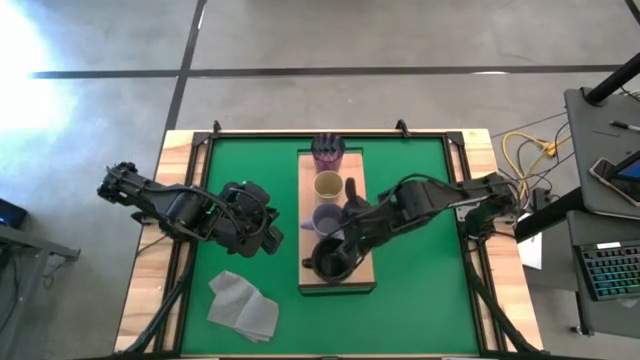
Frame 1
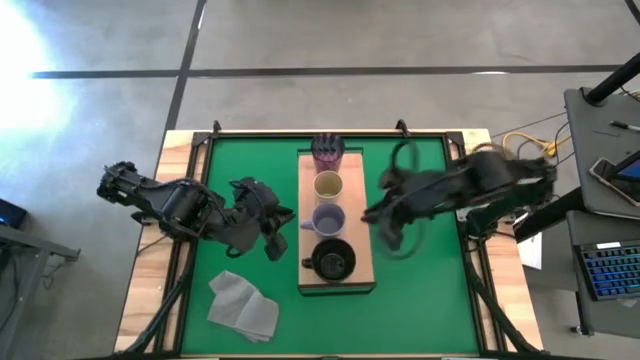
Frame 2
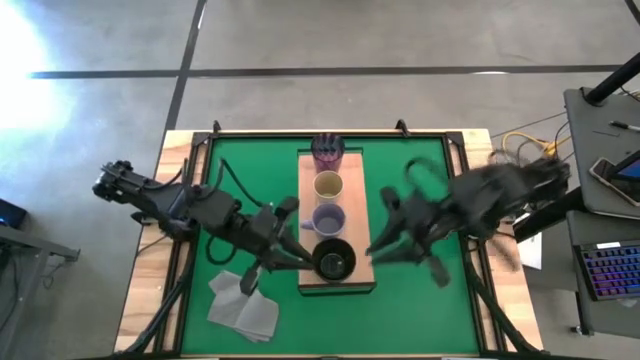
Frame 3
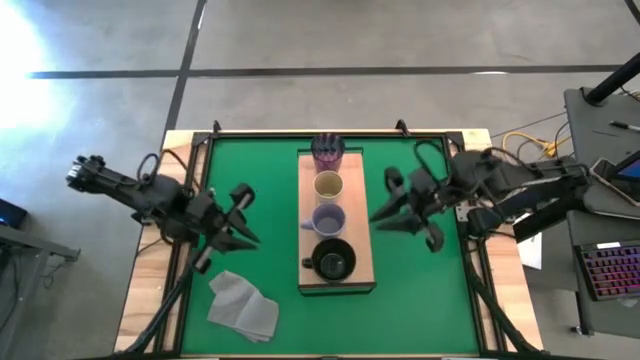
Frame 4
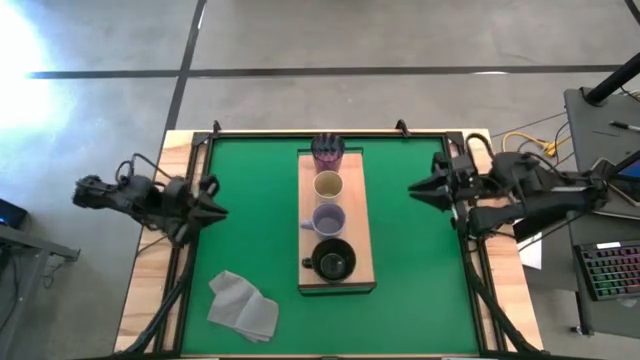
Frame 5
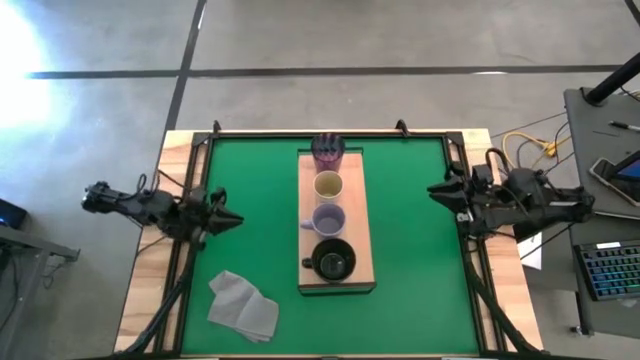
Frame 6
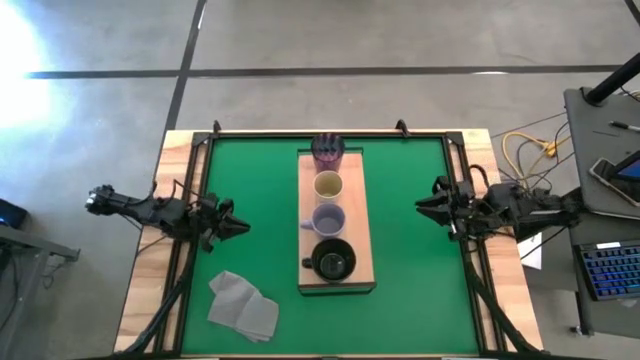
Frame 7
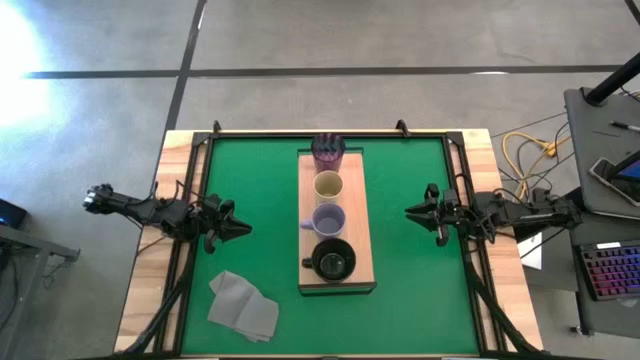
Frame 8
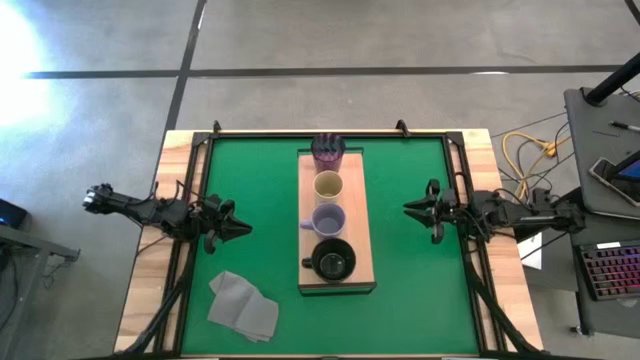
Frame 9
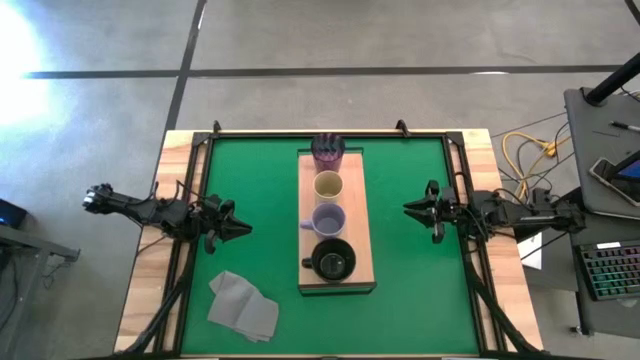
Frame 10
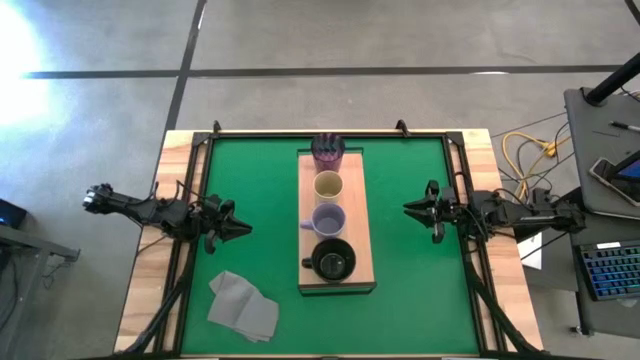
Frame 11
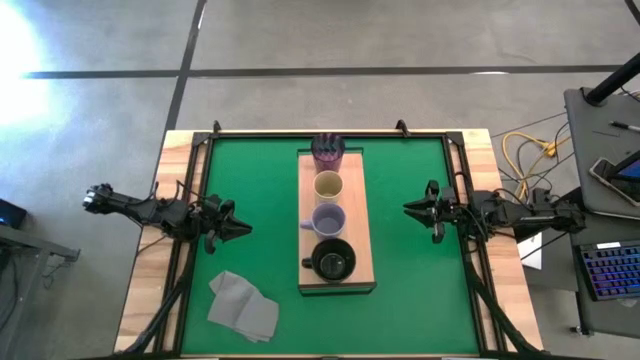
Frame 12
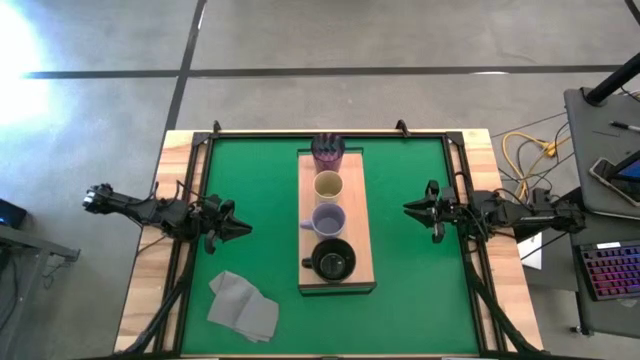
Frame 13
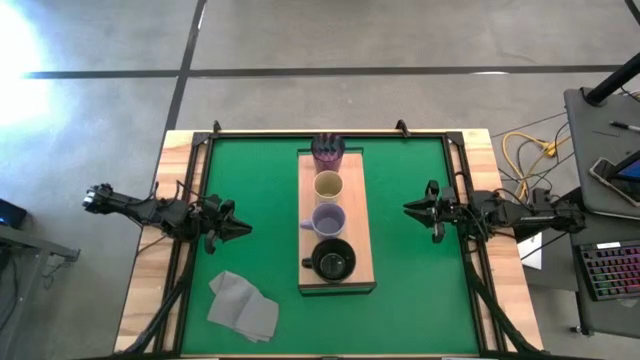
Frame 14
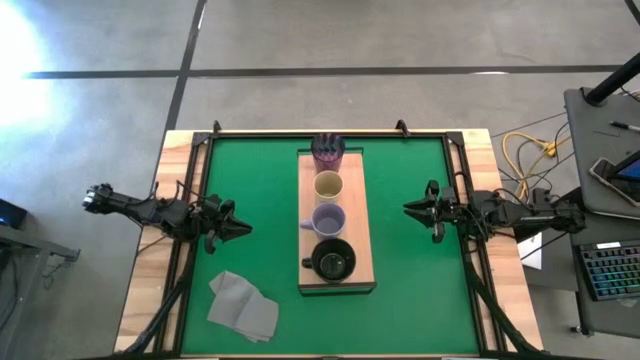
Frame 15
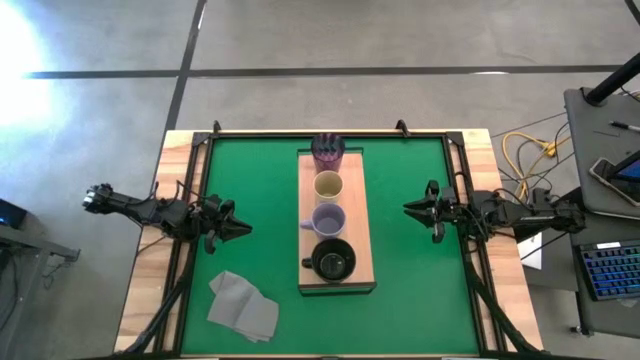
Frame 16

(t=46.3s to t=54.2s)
Task: Stack small to large cups/mugs on shelf
Return to Home Position

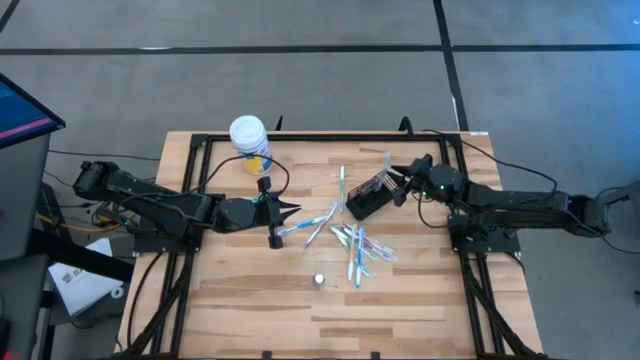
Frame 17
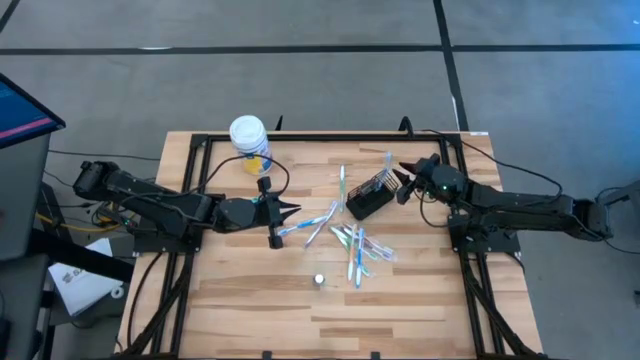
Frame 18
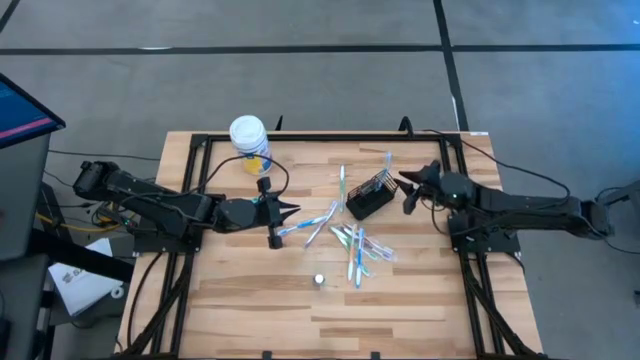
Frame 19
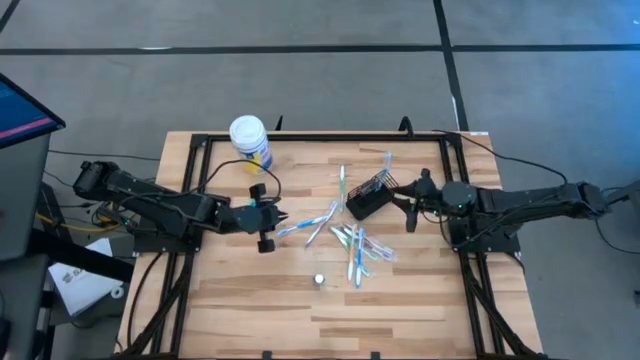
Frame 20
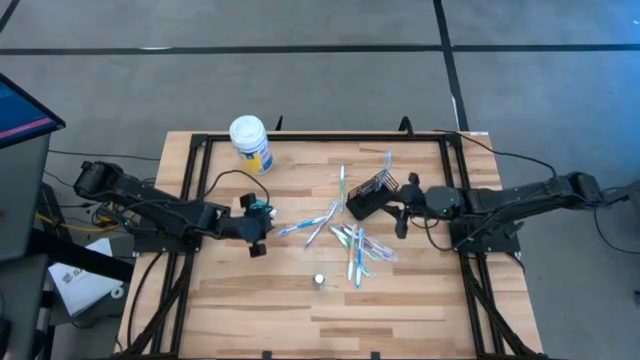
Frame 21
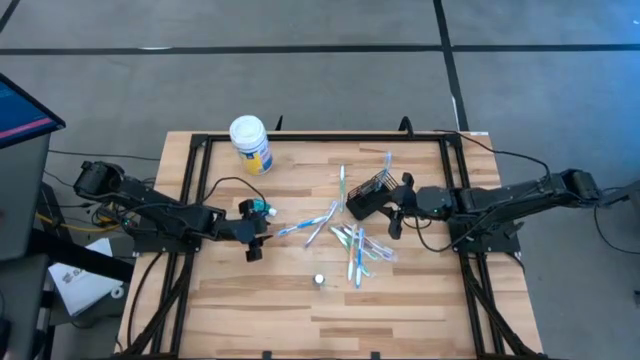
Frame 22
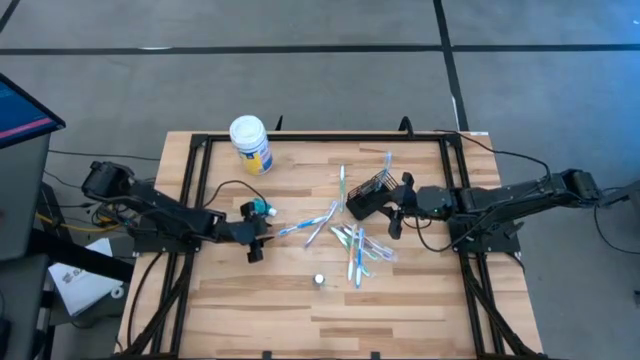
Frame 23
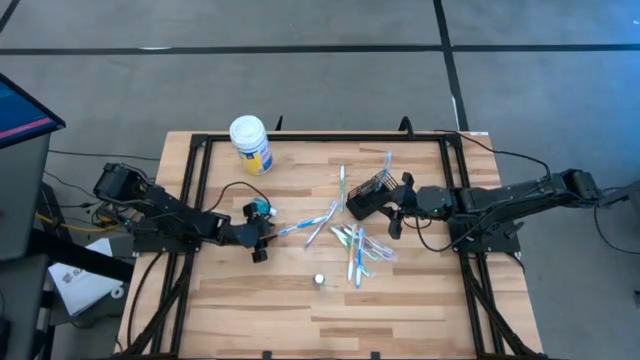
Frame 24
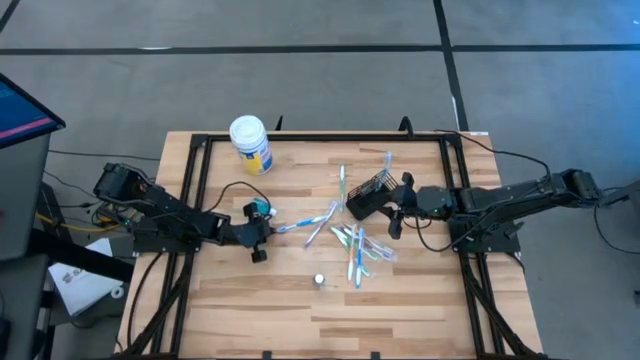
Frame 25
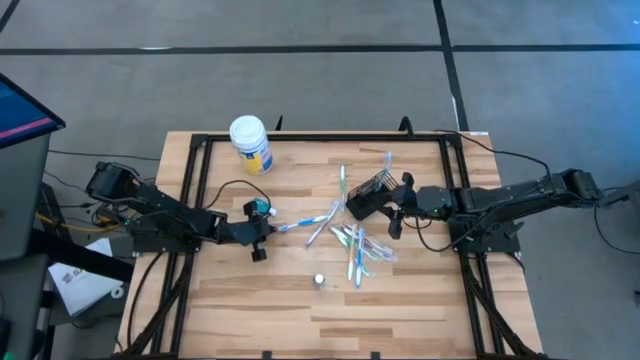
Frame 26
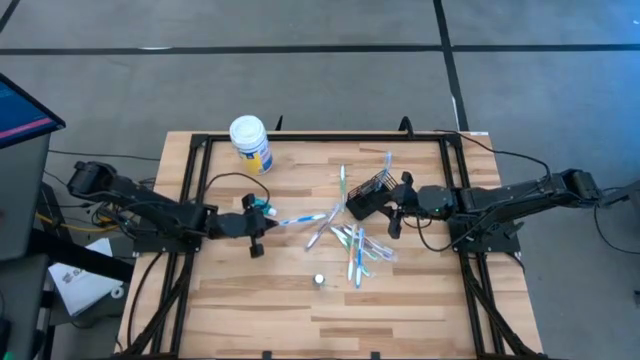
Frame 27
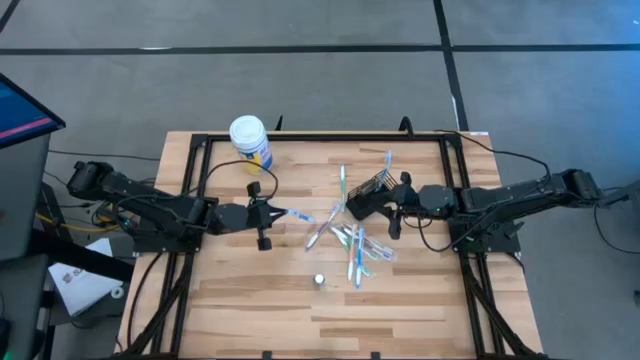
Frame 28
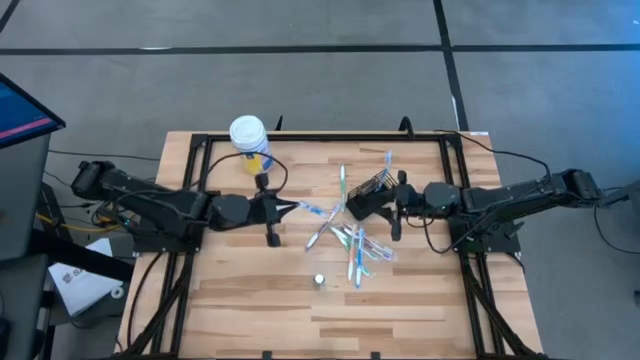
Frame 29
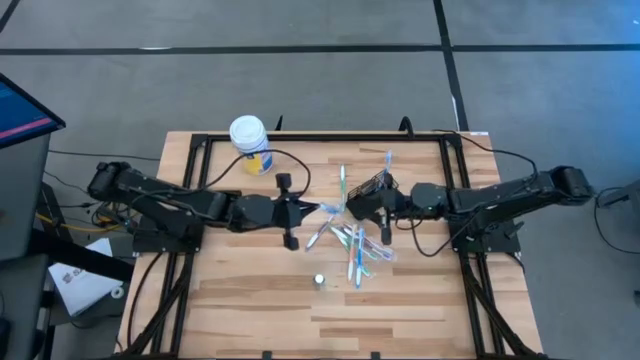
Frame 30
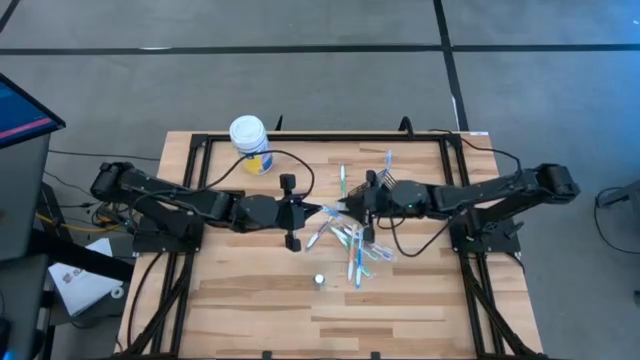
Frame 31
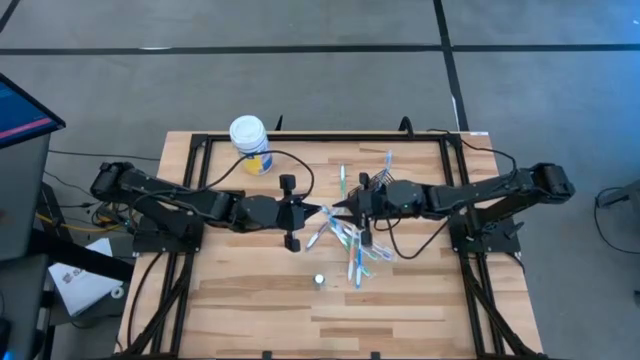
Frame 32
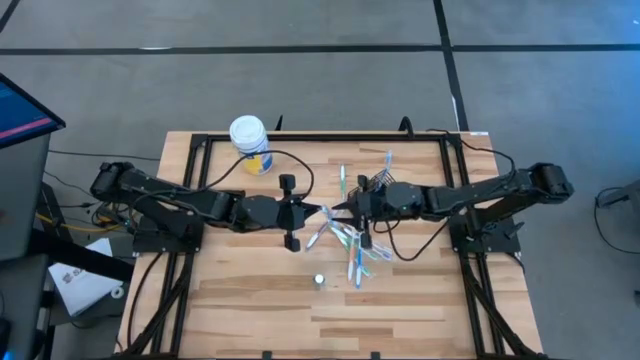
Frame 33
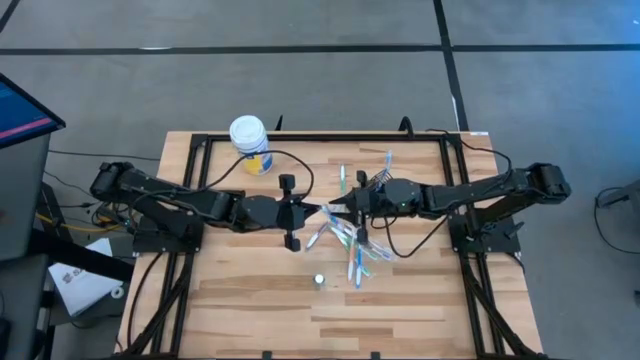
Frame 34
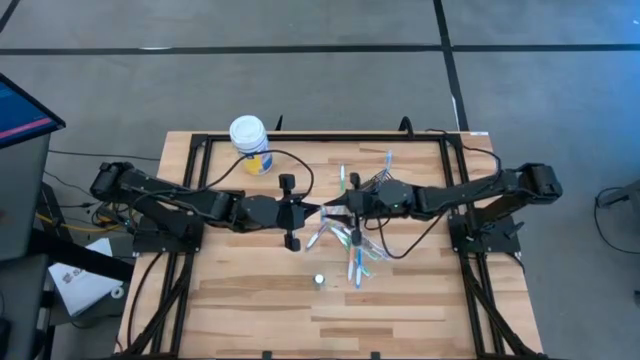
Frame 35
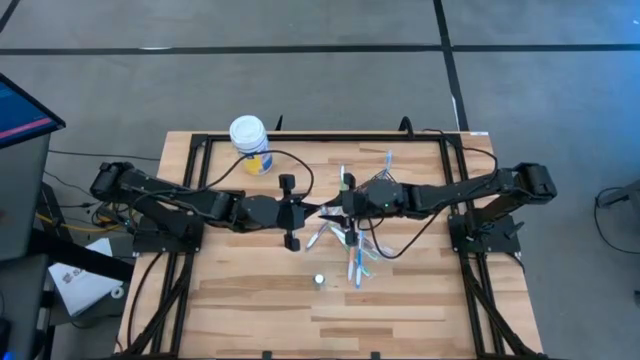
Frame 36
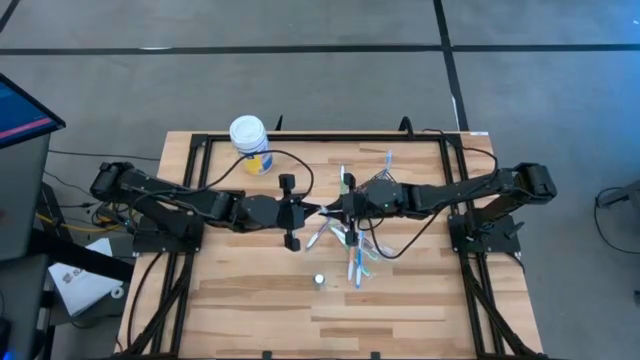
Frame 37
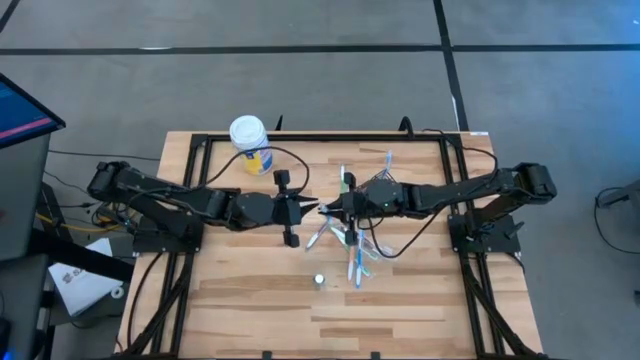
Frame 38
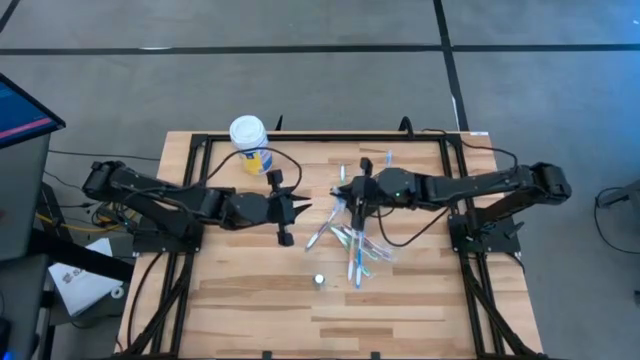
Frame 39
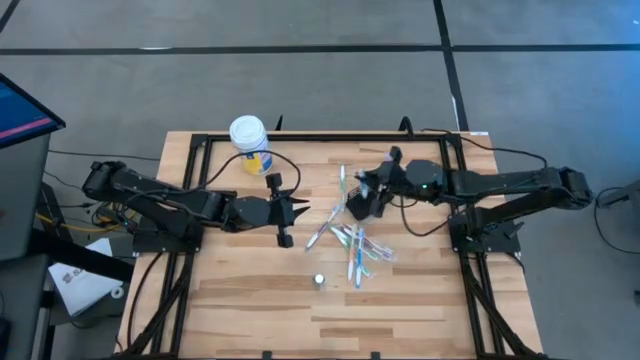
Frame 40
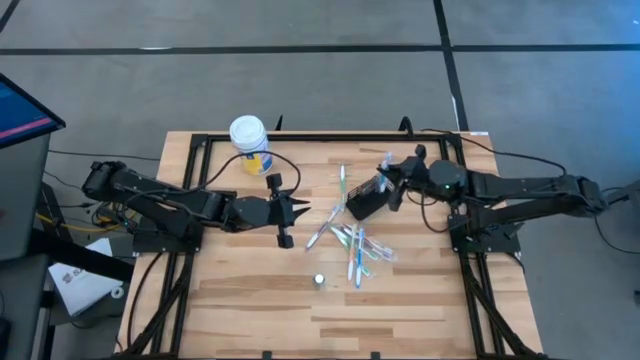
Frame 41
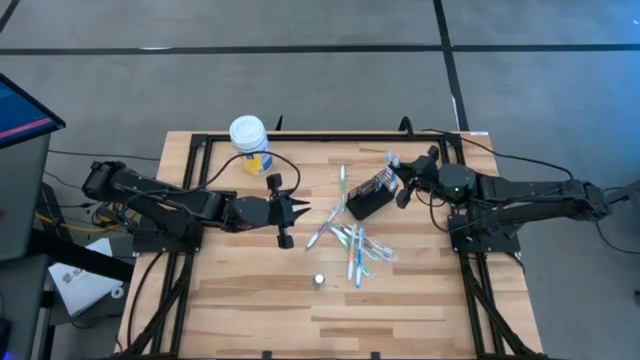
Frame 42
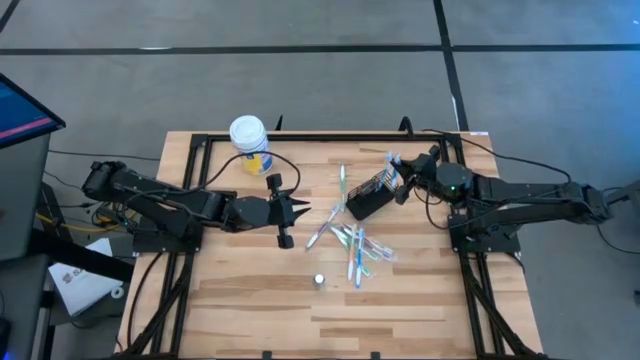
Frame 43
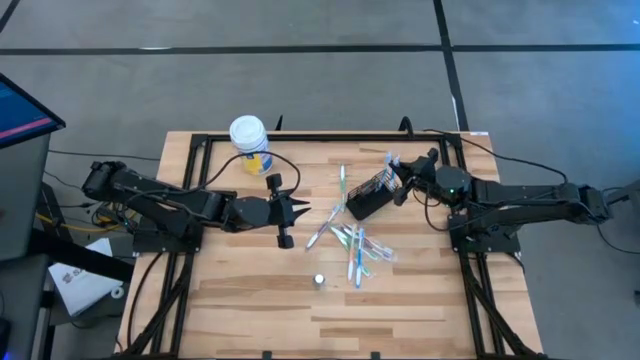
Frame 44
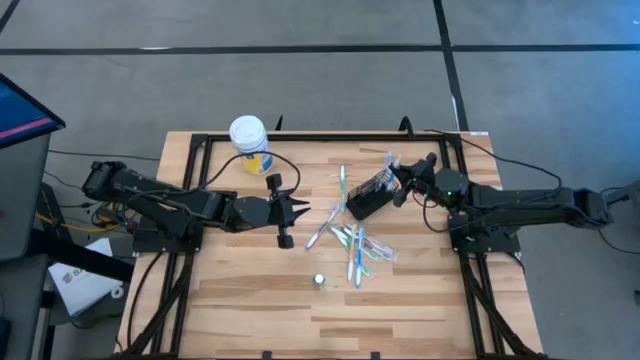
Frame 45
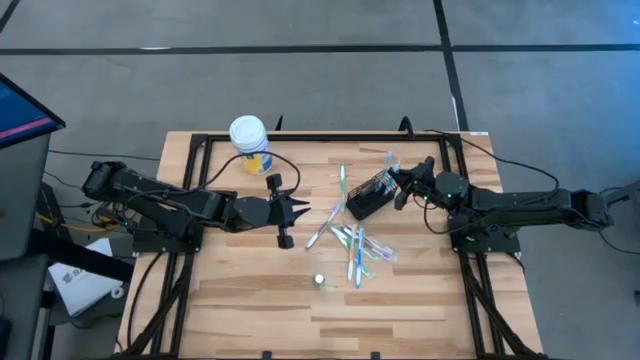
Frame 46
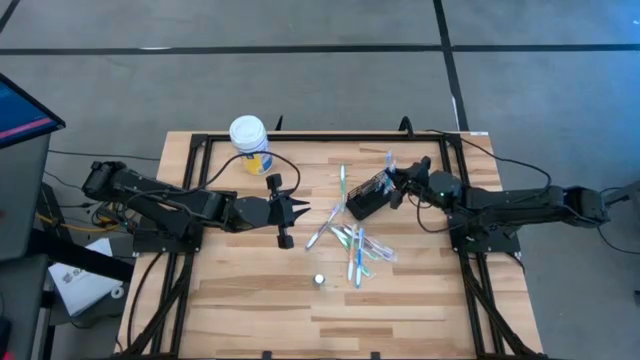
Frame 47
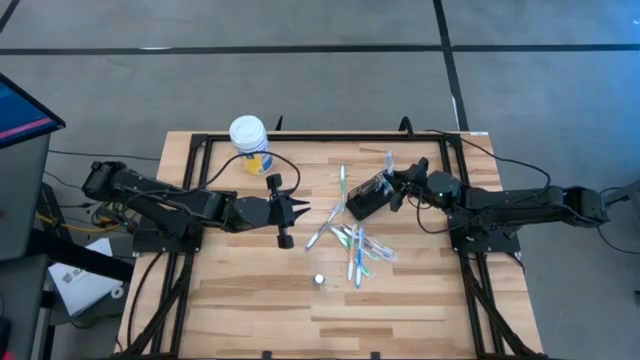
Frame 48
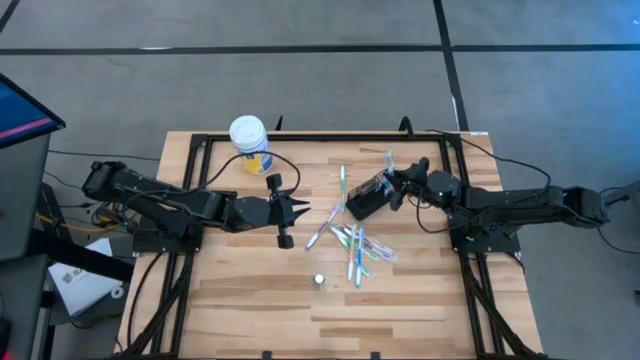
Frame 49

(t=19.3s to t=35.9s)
Task: Pick & Place toothbrushing station
Put the blue toothbrush into the mesh organizer
